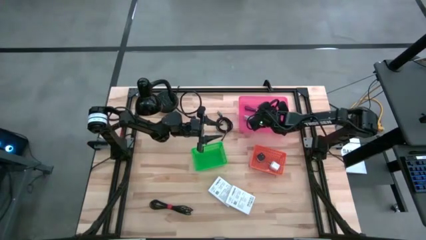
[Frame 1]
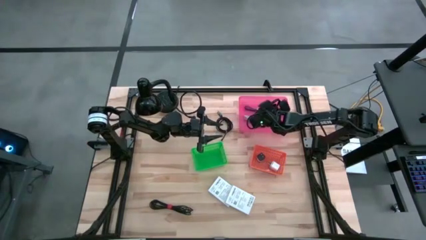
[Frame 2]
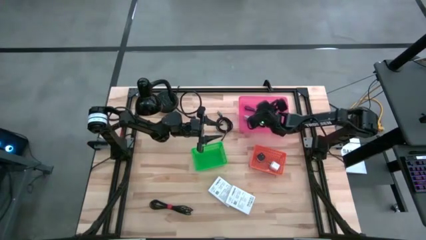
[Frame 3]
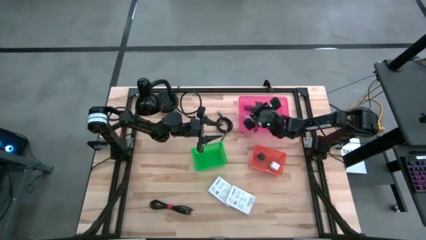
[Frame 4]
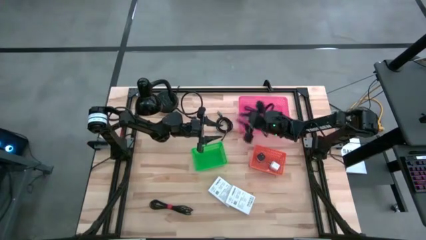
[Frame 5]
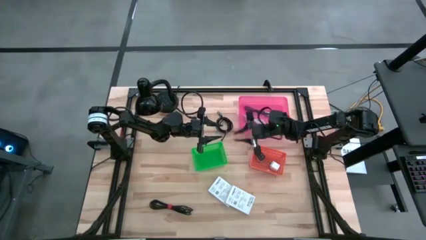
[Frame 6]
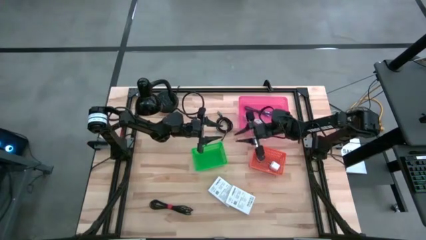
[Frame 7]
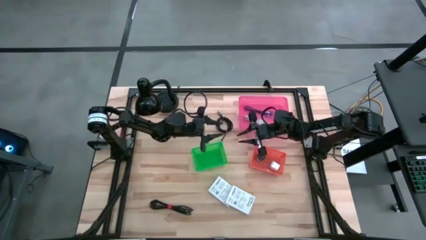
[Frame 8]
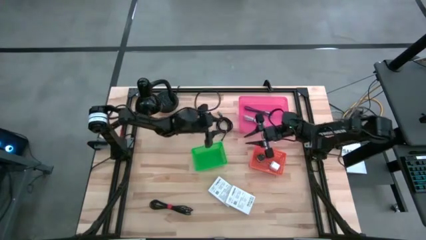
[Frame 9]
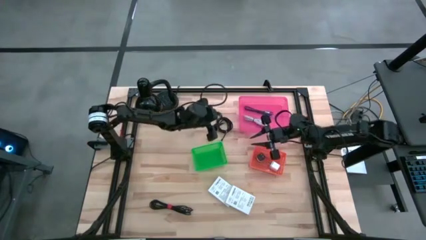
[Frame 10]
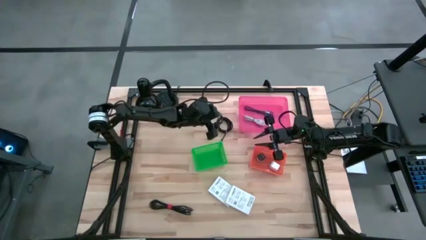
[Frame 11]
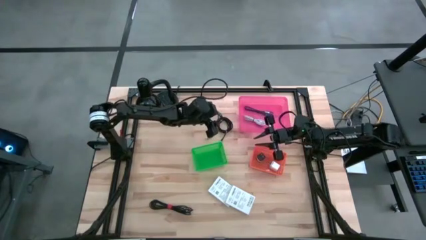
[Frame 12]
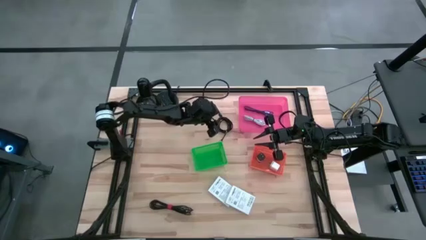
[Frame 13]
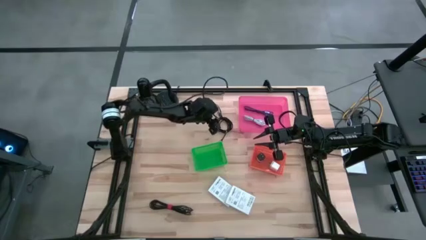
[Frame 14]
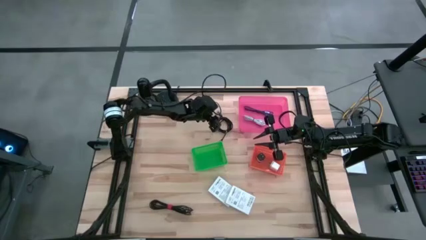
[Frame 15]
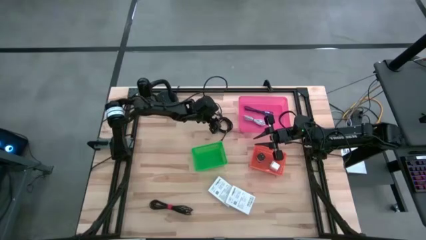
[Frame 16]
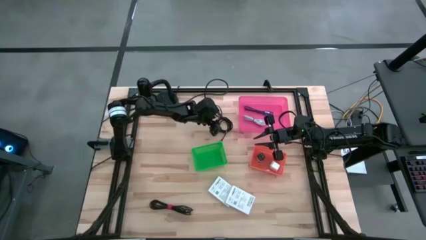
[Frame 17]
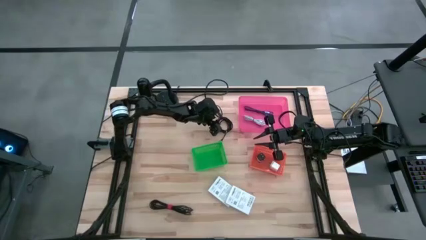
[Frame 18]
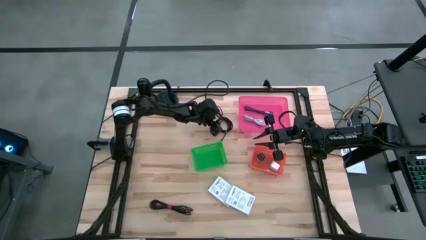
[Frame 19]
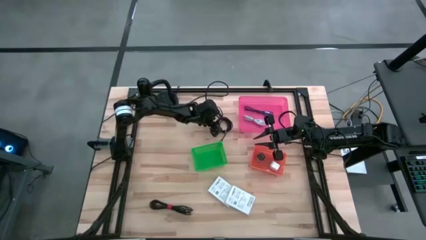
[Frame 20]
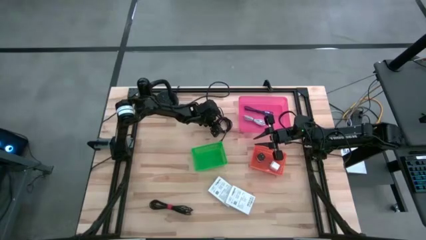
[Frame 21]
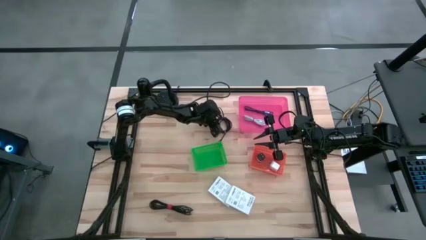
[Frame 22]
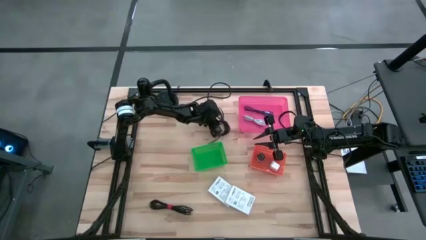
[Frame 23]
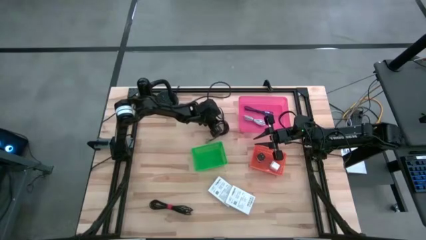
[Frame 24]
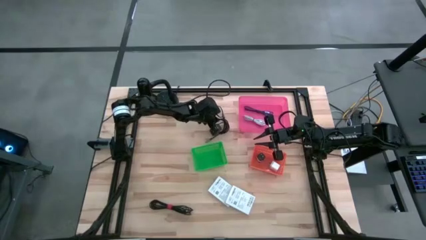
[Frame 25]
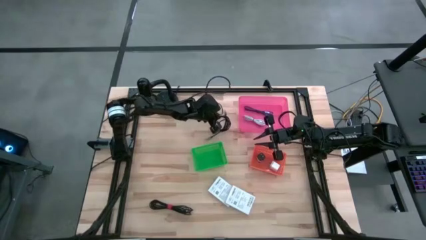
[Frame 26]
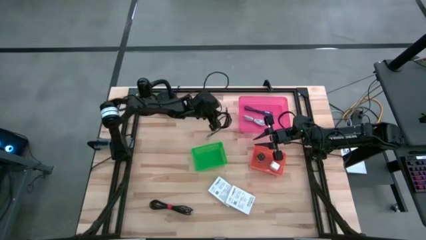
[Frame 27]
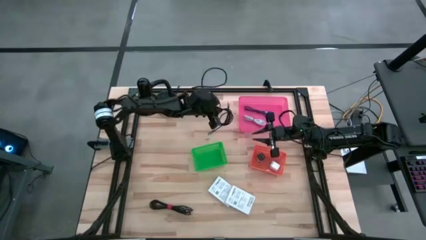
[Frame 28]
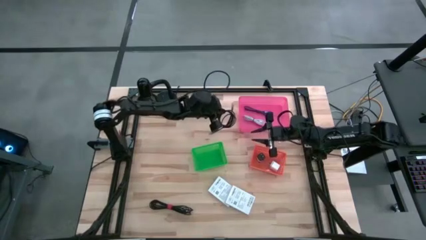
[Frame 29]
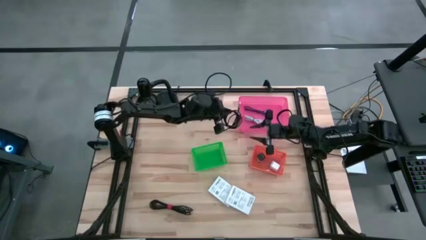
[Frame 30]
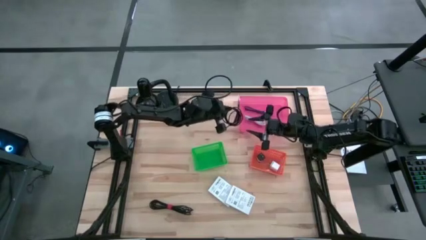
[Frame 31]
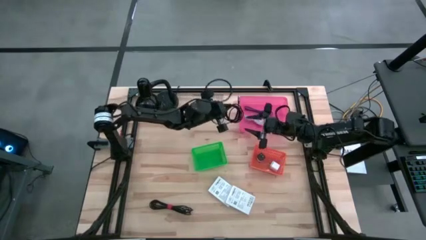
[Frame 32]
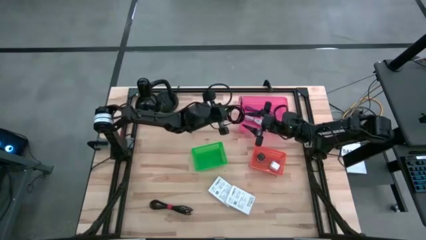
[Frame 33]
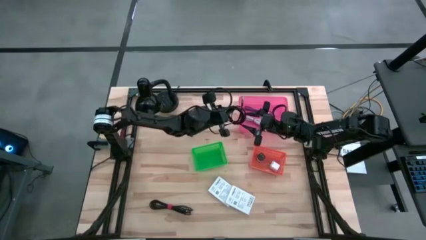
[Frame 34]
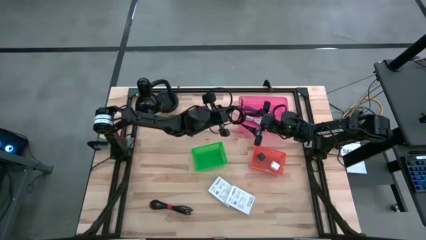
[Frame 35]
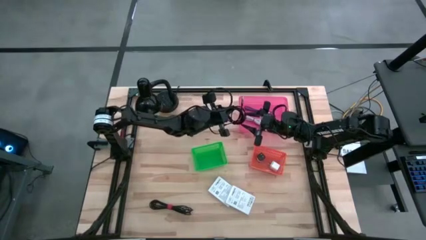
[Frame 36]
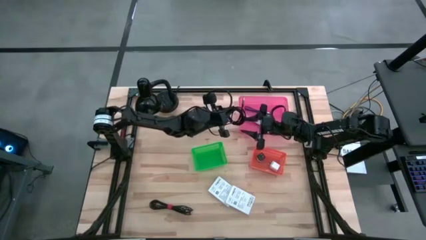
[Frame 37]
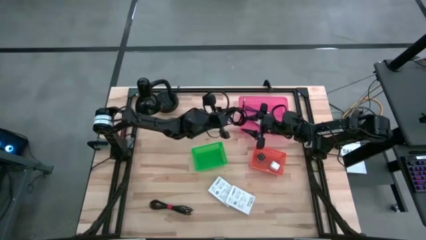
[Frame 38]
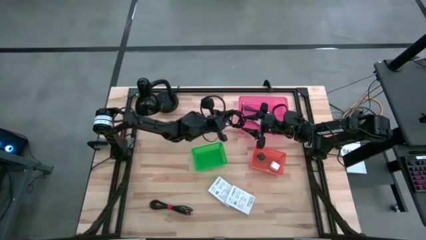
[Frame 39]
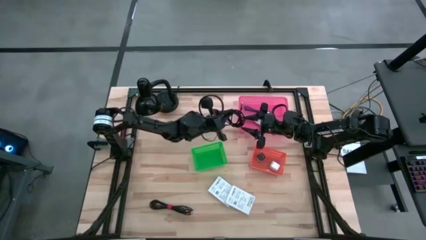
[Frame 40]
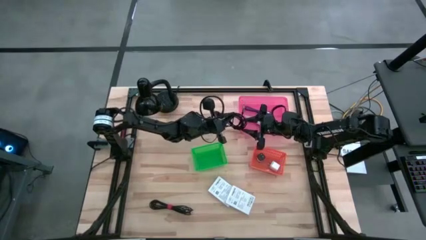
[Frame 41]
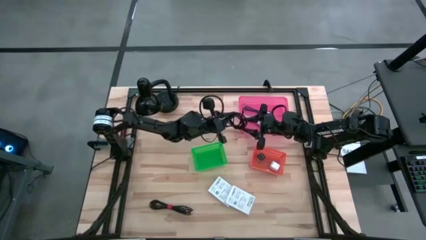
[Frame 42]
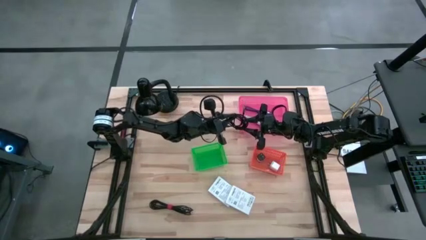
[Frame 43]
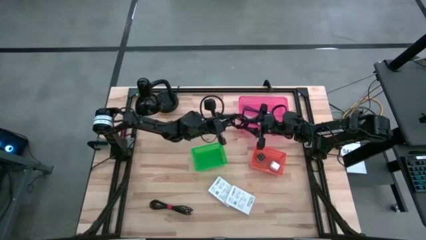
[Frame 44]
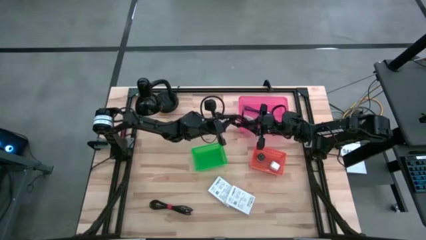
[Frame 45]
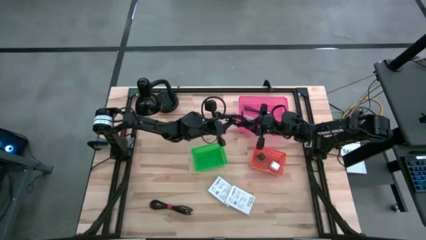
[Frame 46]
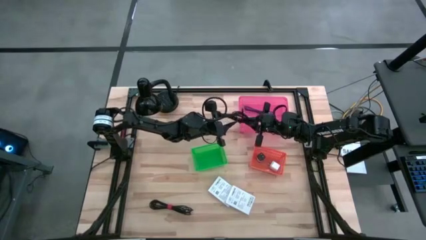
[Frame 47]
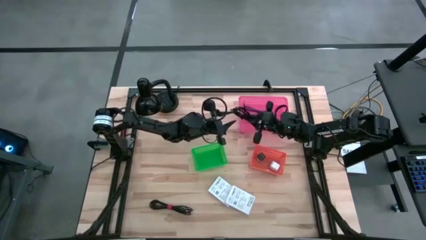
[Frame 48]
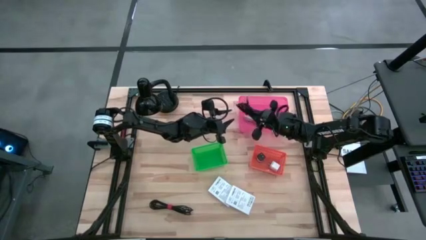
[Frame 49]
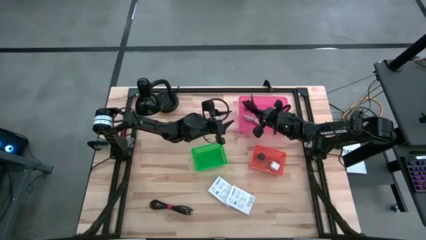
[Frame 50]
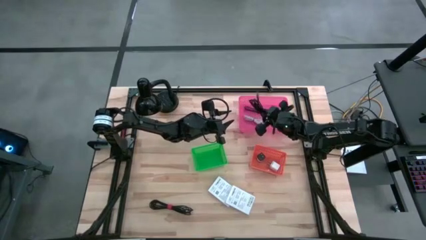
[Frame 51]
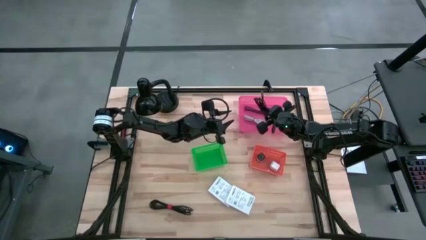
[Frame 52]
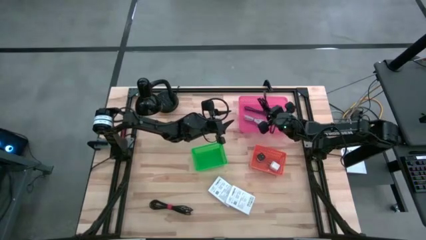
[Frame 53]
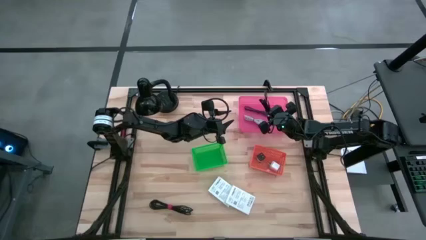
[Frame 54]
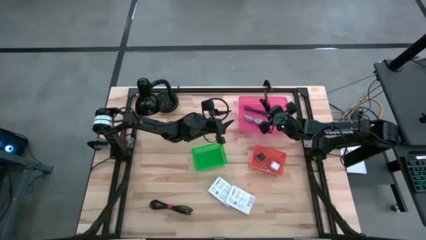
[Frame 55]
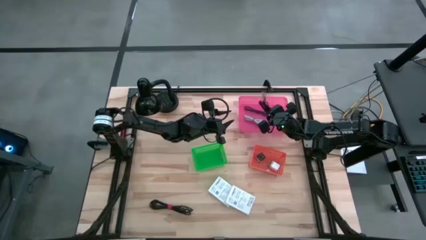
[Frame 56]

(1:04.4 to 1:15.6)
Task: Pick and place items into bin
Put the top black charger cable into the pink bin

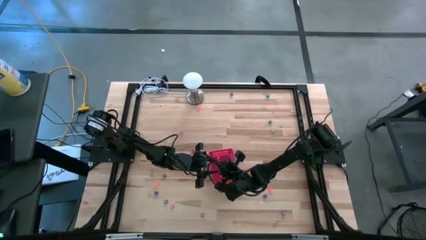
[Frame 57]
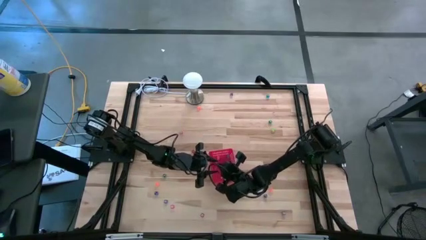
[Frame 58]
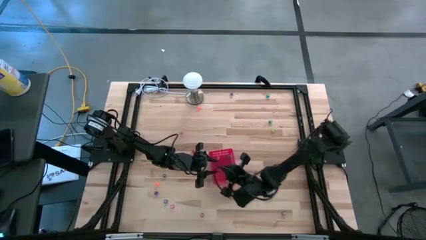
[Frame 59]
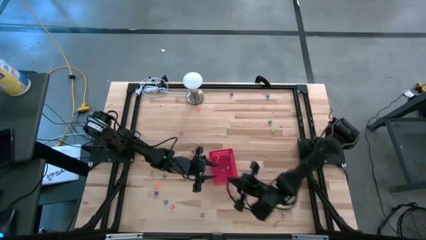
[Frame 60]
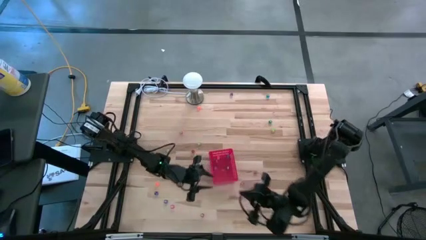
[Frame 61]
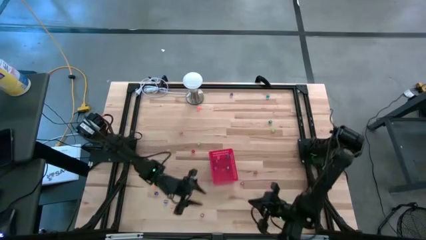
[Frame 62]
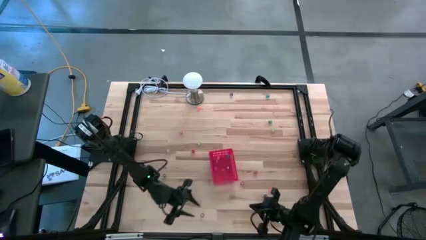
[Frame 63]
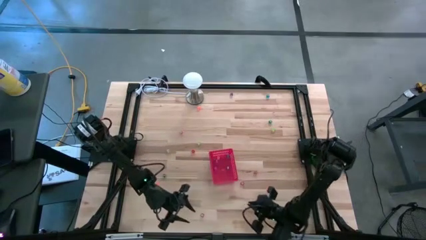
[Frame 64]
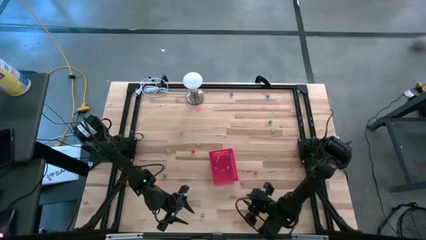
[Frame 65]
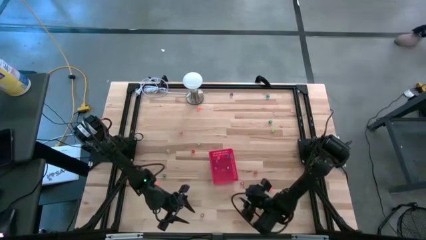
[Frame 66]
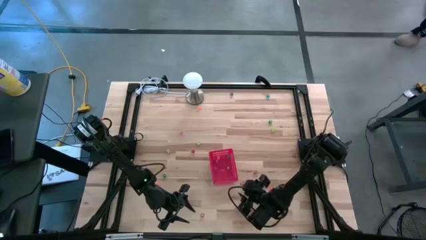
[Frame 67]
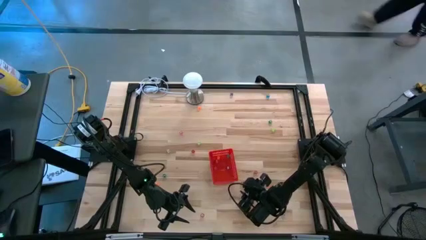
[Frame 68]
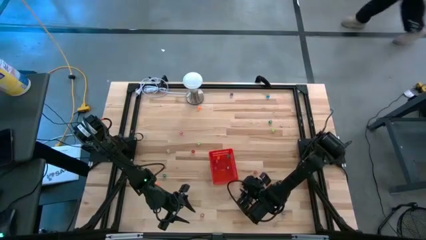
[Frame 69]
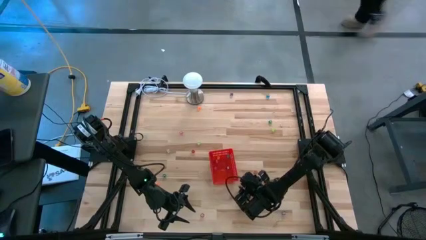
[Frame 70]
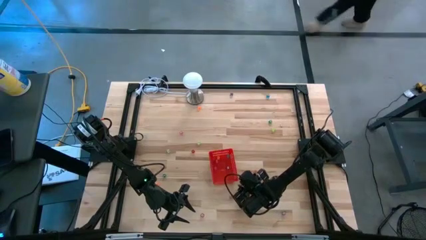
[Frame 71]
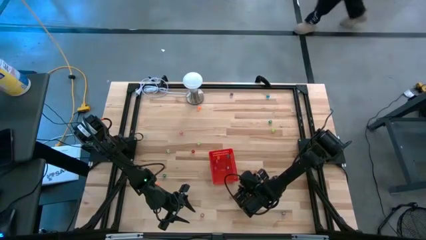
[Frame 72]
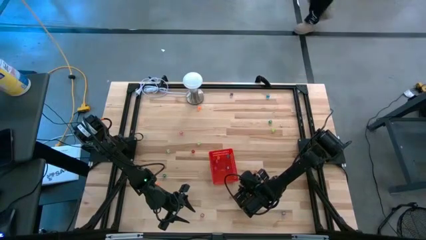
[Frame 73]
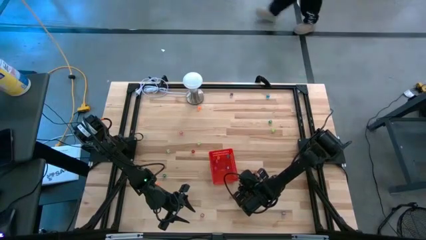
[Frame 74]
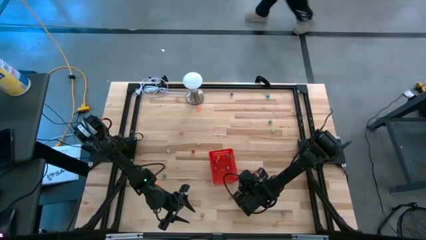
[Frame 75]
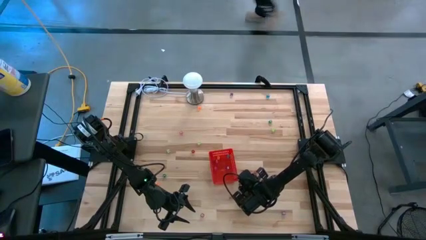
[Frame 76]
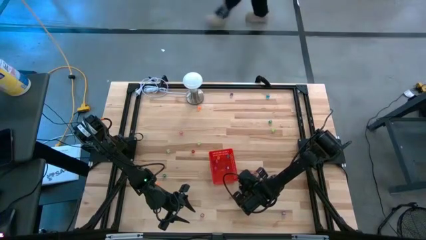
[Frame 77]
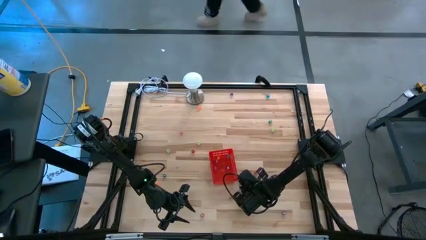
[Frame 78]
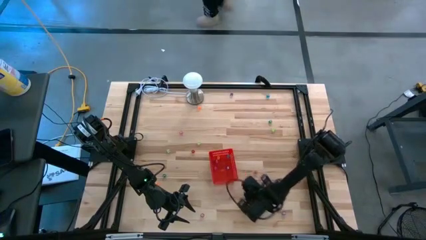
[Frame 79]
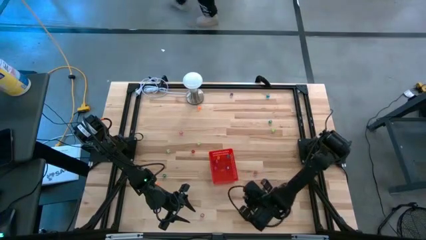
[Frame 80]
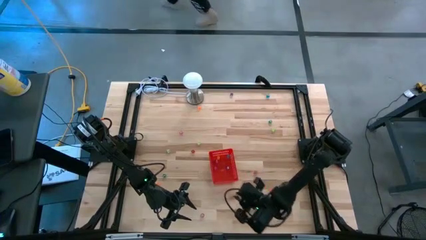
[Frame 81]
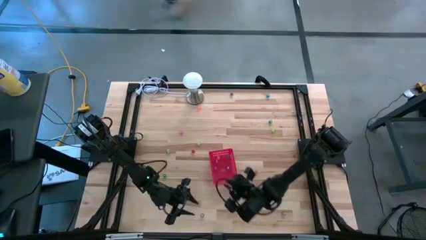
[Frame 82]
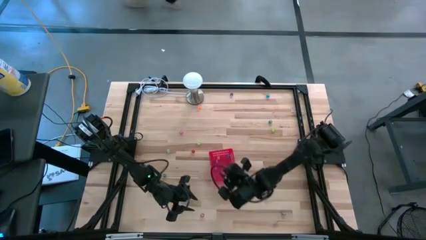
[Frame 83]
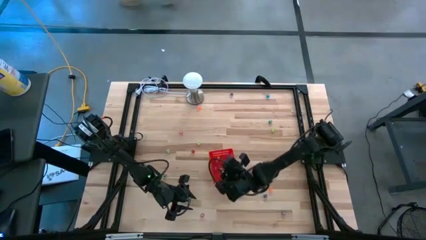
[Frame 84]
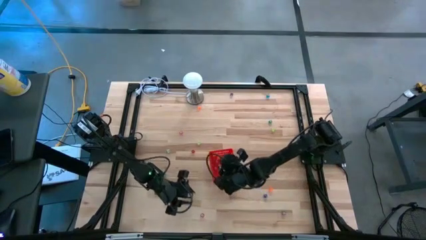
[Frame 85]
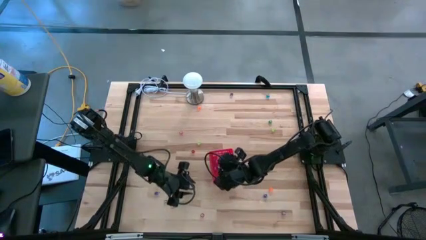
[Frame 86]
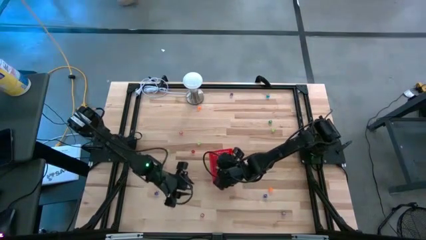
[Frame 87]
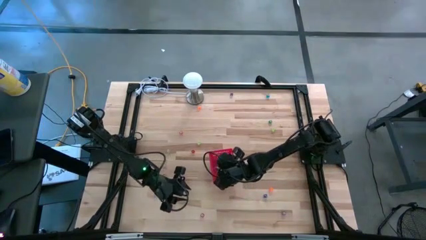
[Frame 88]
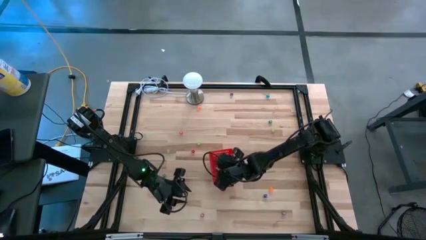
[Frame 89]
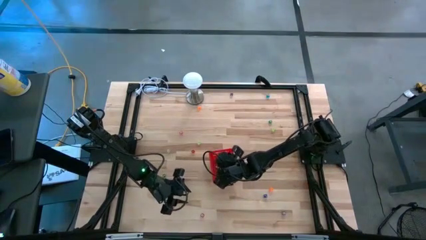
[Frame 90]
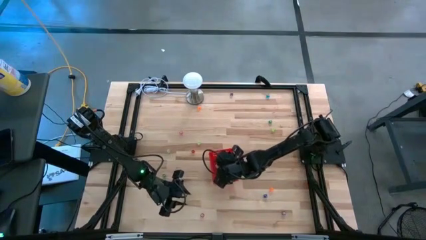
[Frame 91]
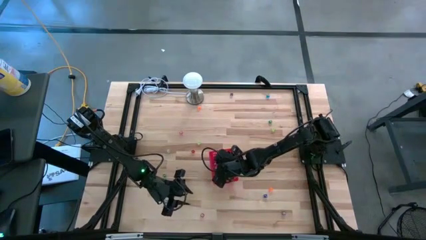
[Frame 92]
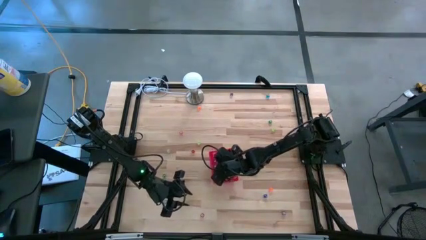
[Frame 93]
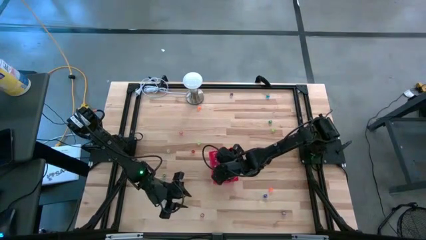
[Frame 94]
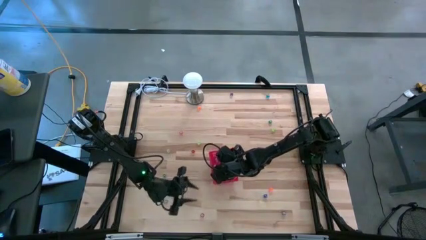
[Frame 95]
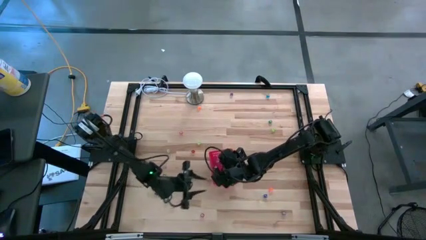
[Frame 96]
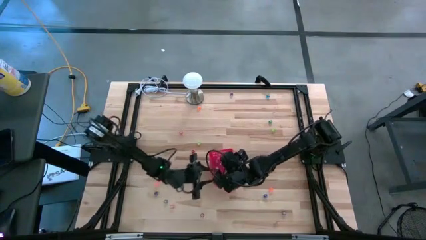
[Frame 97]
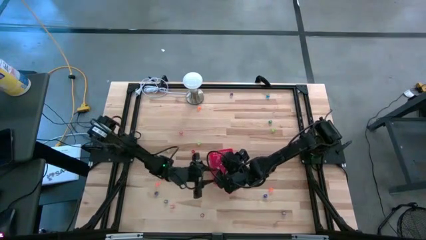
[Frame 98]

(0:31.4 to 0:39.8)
Task: Pick & Place Dice
Put the red die into the red basket
